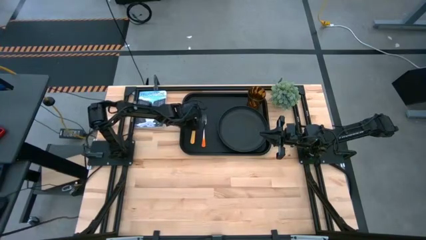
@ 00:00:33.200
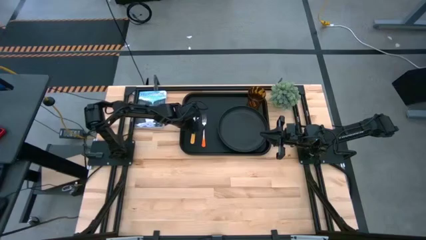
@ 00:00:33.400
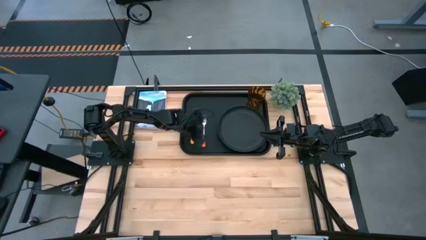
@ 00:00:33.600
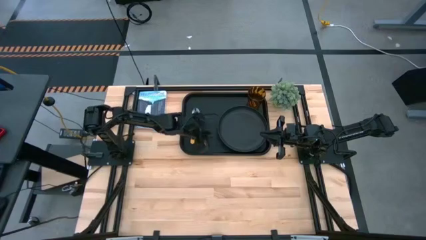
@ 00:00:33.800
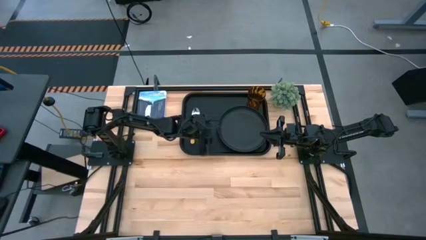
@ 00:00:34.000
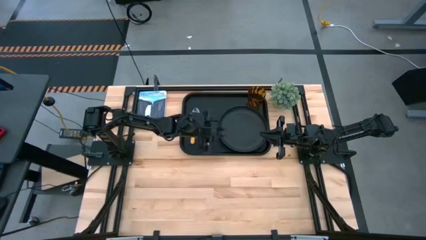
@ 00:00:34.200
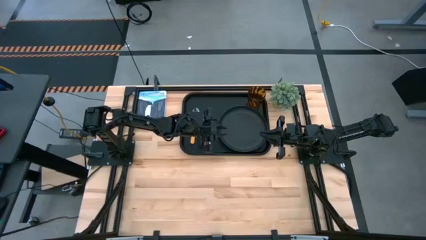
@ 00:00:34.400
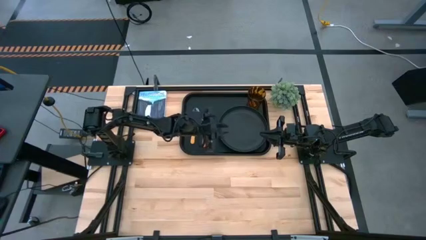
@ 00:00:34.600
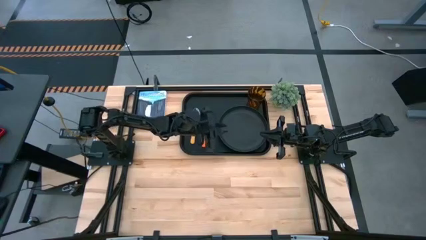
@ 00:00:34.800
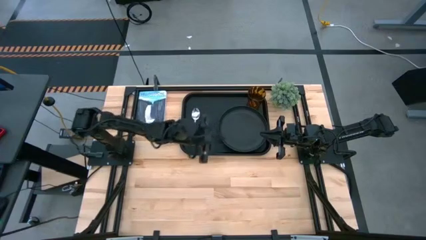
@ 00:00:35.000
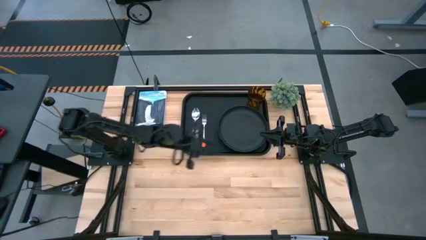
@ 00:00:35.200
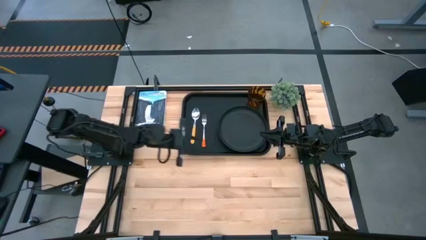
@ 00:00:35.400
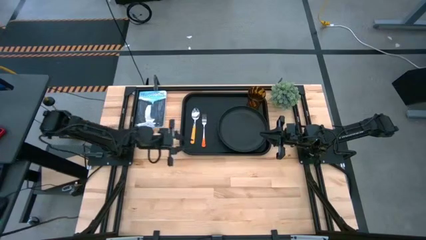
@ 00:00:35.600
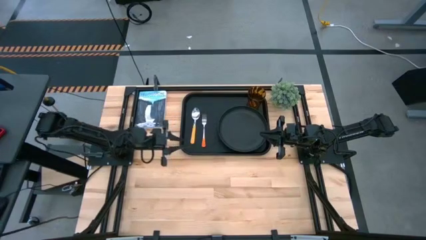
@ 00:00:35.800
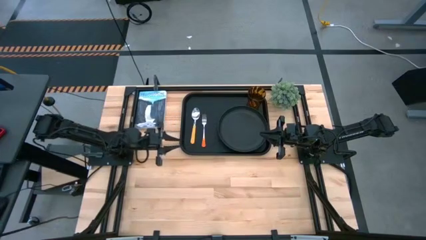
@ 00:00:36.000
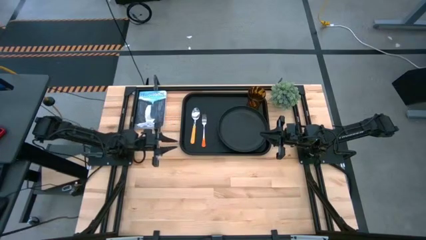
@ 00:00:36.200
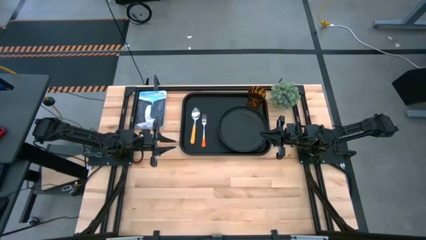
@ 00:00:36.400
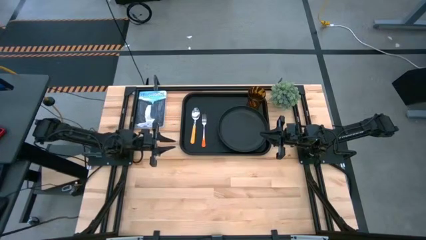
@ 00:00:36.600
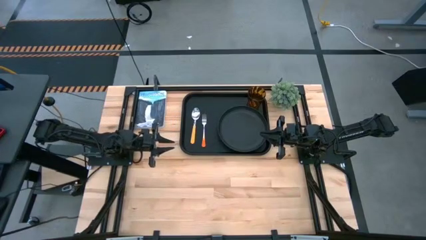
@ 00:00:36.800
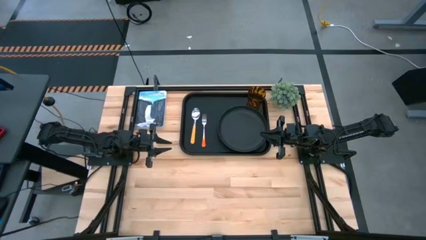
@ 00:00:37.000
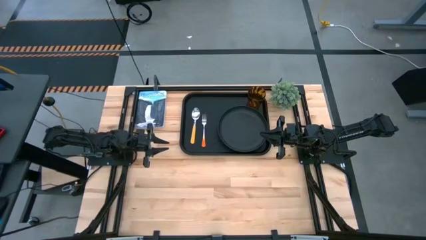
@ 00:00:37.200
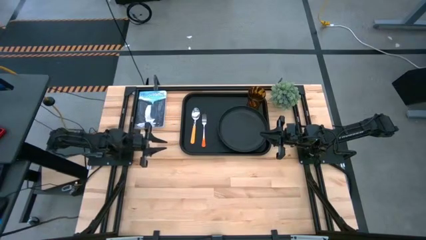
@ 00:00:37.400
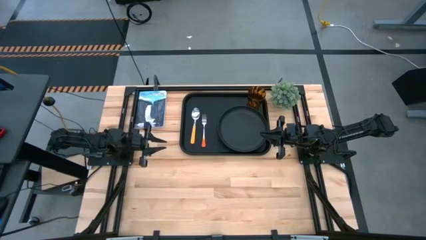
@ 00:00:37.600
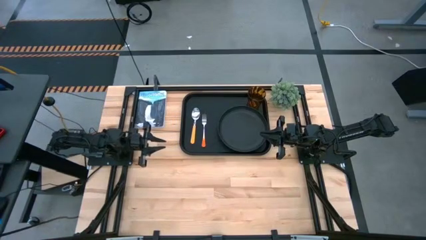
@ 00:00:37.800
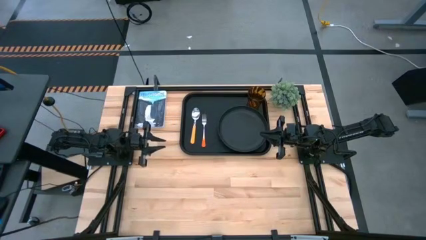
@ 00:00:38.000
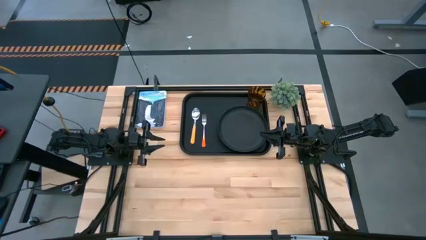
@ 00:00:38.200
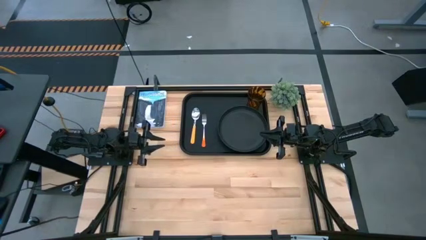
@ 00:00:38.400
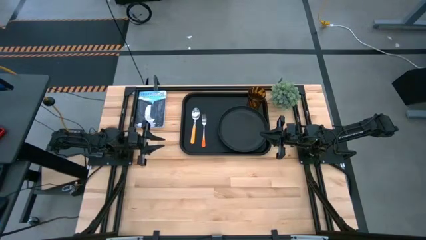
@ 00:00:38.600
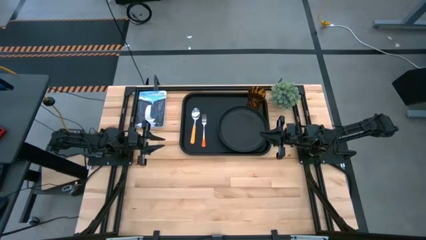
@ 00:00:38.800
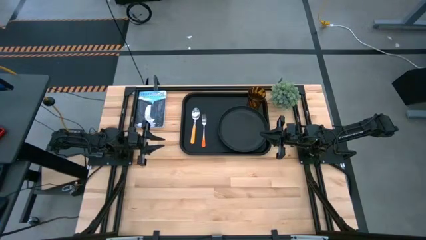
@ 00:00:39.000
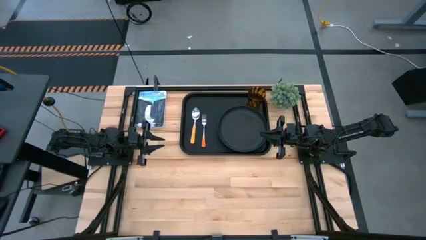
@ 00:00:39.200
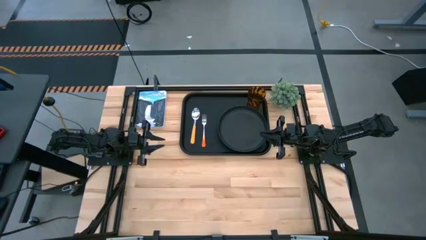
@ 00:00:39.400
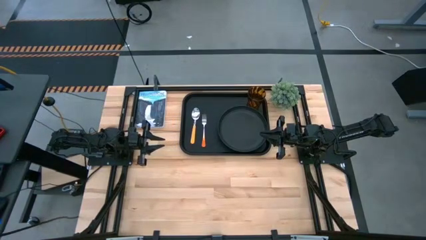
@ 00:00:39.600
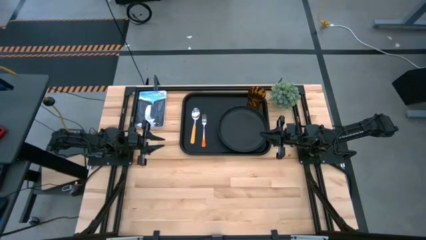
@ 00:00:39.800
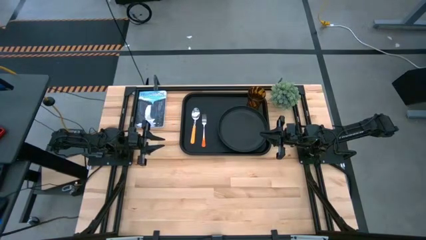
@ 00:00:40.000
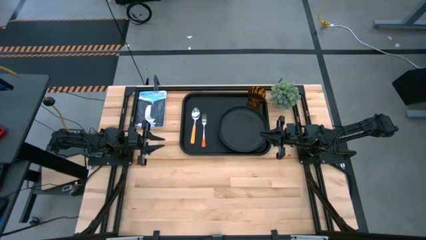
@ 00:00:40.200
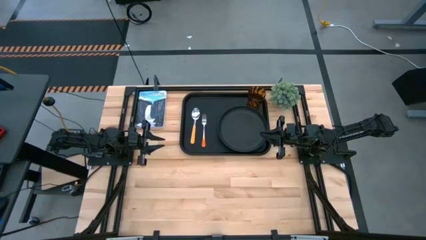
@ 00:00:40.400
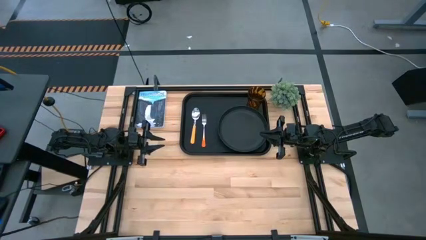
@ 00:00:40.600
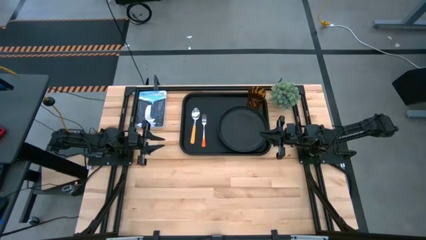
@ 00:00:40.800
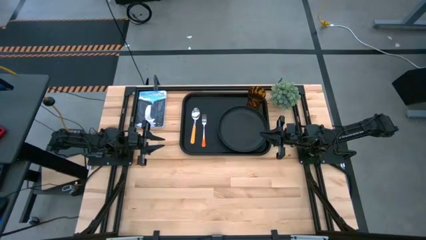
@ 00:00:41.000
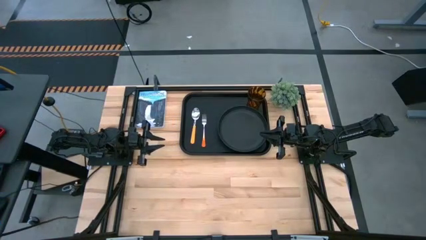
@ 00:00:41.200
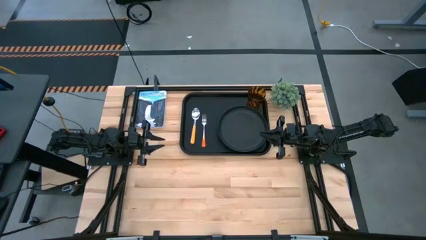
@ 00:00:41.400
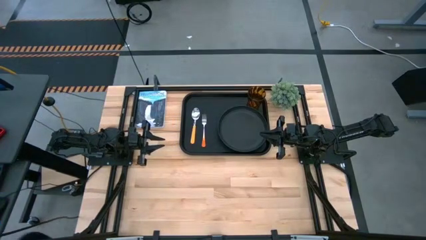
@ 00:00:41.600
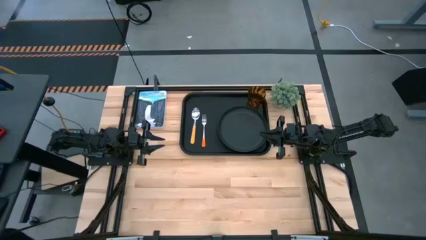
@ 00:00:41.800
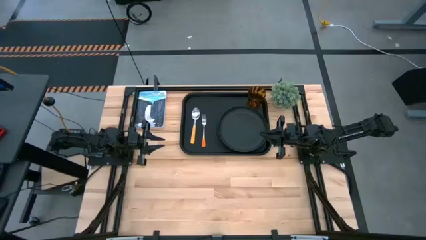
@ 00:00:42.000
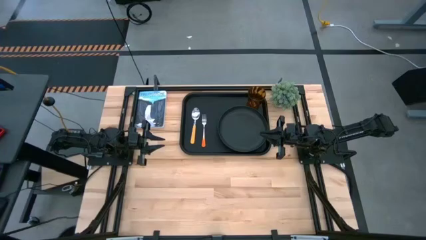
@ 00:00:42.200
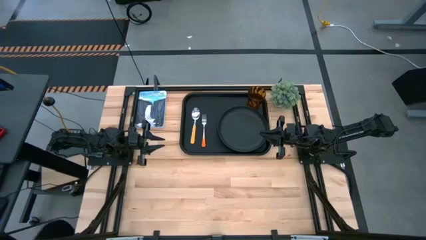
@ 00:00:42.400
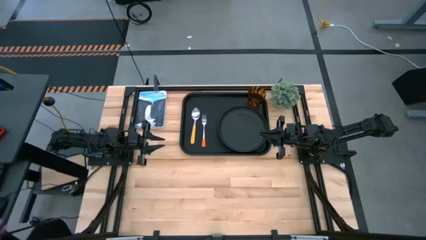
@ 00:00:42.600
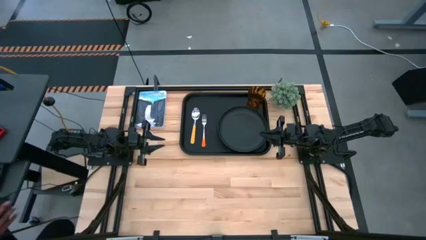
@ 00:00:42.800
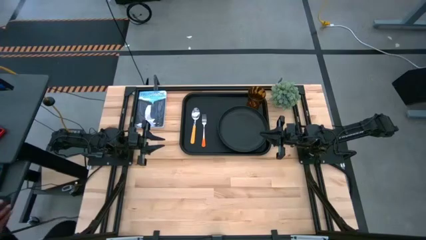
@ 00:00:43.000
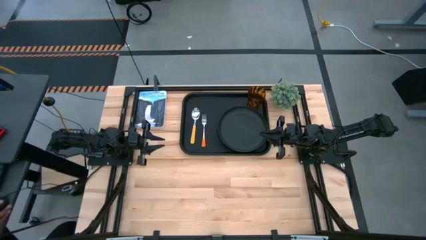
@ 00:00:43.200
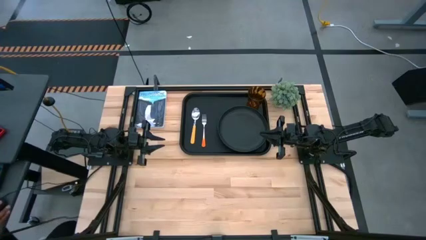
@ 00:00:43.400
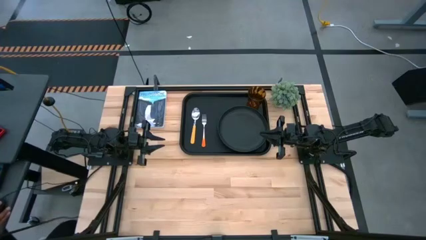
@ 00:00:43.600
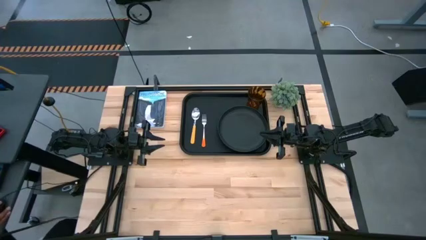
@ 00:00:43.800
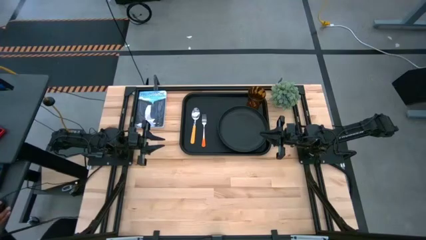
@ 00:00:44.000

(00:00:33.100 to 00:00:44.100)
Task: Pick and place plate/cup/fork/spoon on tray
Return to Home Position

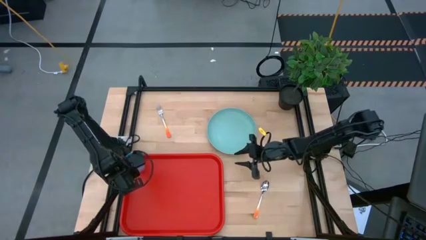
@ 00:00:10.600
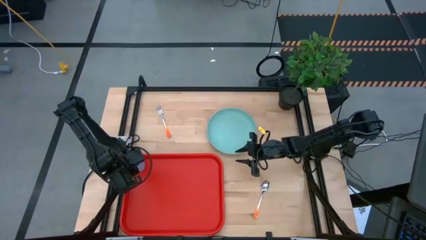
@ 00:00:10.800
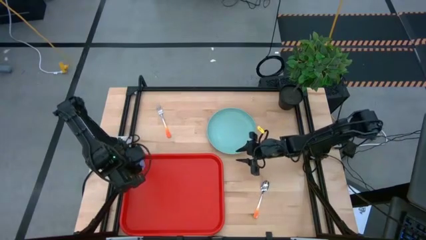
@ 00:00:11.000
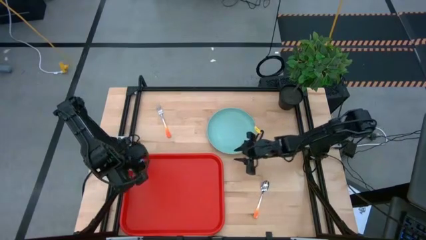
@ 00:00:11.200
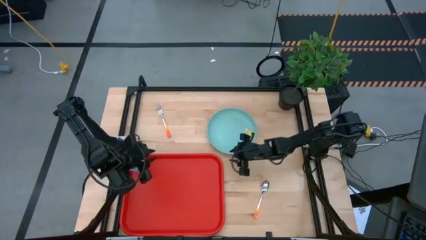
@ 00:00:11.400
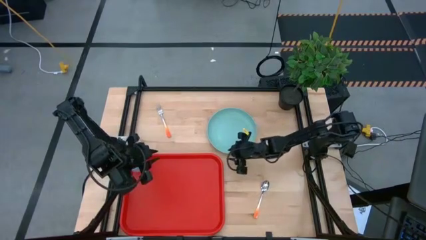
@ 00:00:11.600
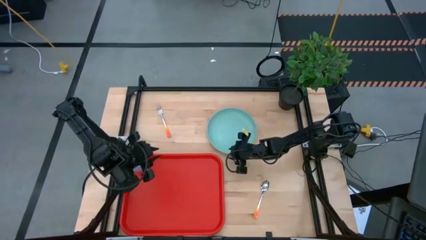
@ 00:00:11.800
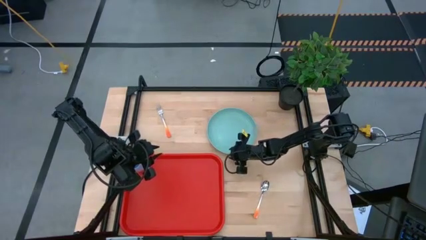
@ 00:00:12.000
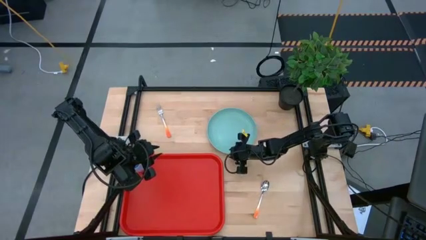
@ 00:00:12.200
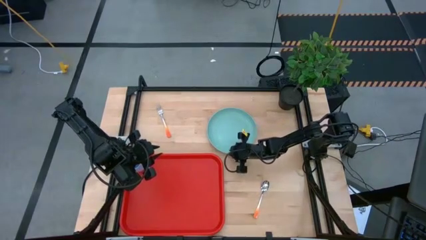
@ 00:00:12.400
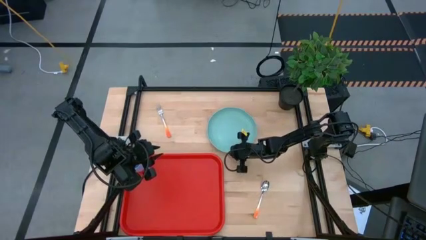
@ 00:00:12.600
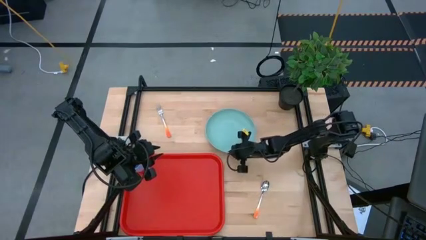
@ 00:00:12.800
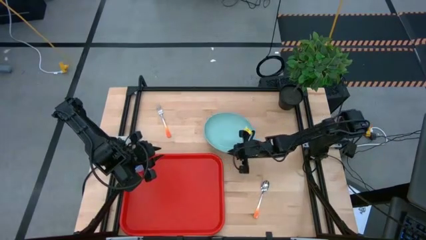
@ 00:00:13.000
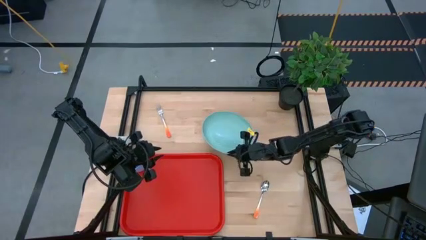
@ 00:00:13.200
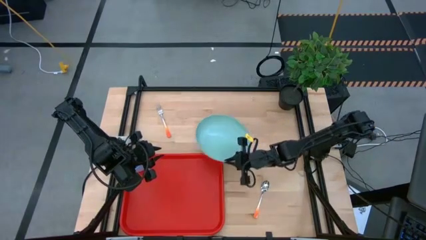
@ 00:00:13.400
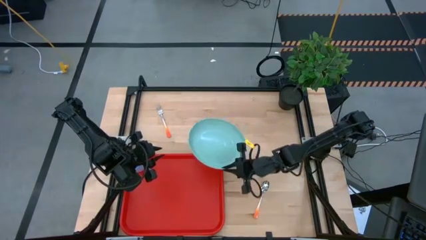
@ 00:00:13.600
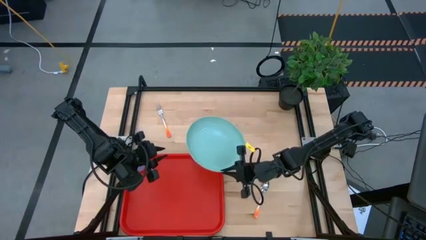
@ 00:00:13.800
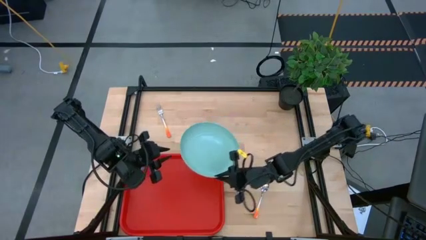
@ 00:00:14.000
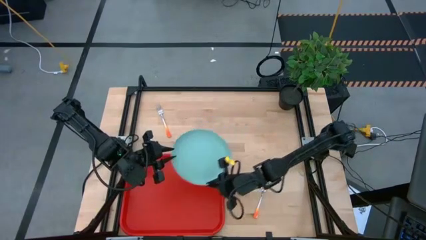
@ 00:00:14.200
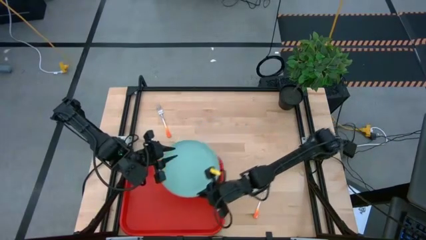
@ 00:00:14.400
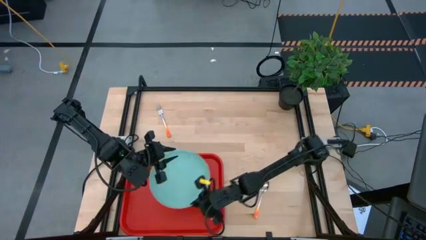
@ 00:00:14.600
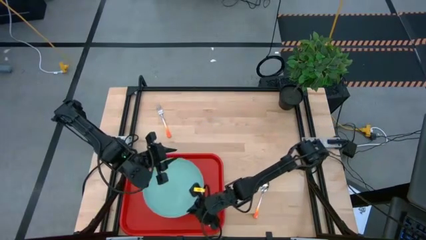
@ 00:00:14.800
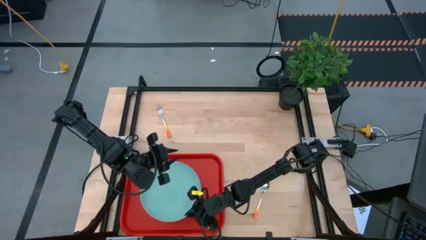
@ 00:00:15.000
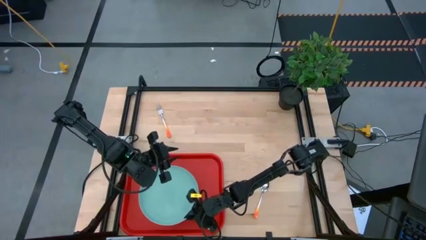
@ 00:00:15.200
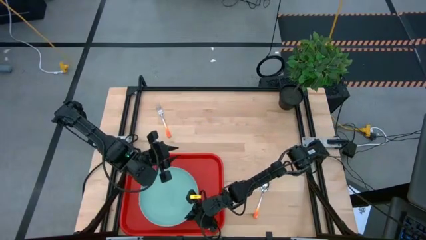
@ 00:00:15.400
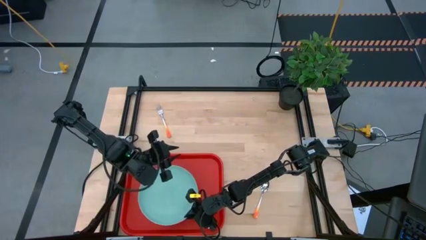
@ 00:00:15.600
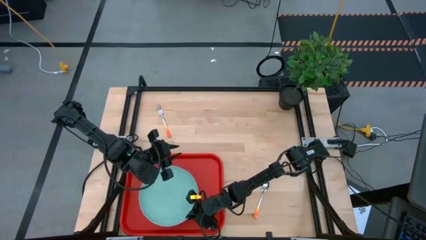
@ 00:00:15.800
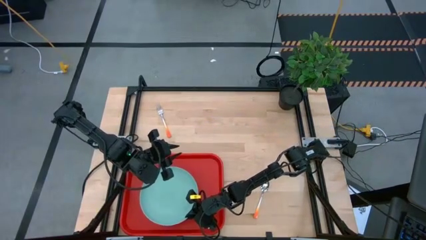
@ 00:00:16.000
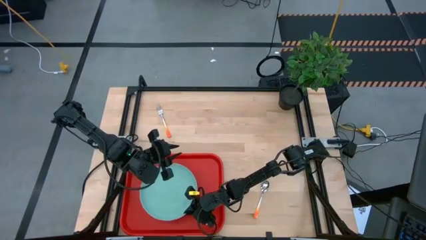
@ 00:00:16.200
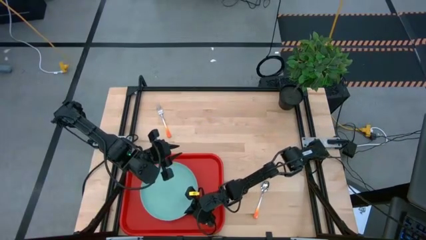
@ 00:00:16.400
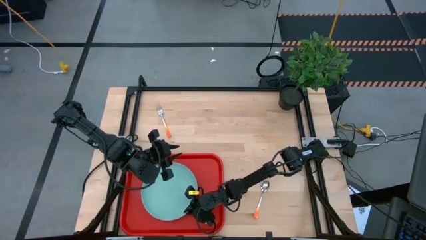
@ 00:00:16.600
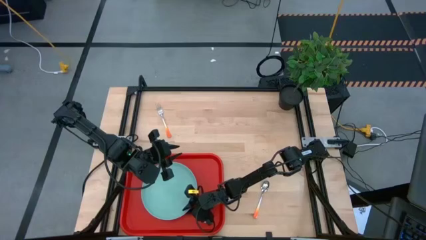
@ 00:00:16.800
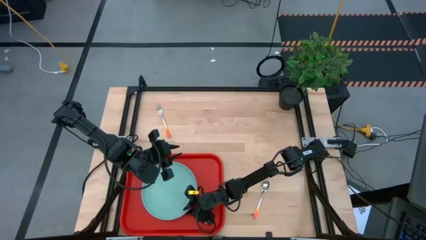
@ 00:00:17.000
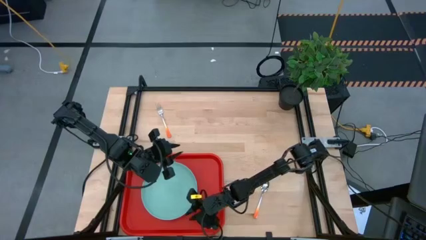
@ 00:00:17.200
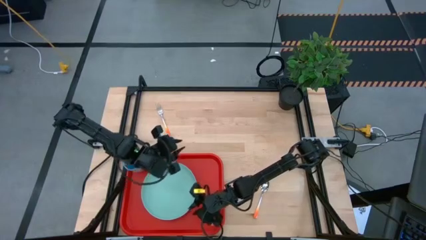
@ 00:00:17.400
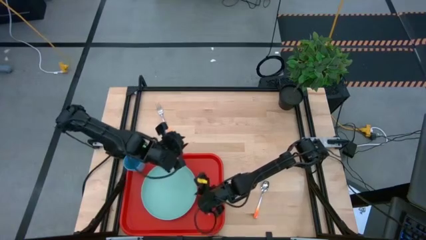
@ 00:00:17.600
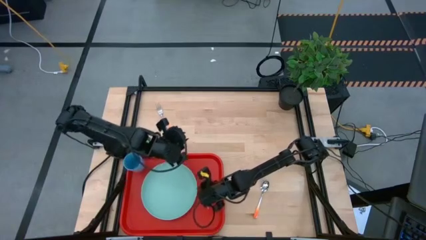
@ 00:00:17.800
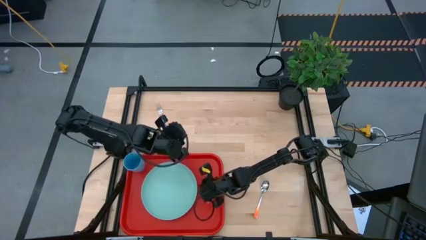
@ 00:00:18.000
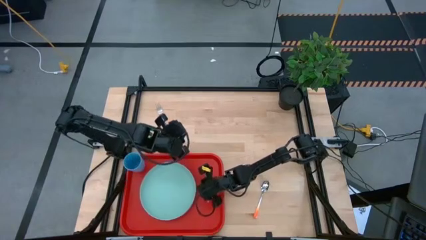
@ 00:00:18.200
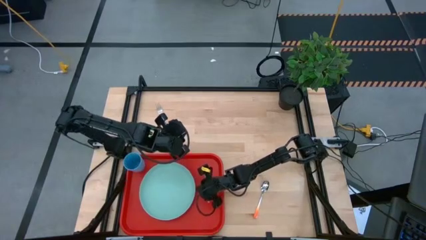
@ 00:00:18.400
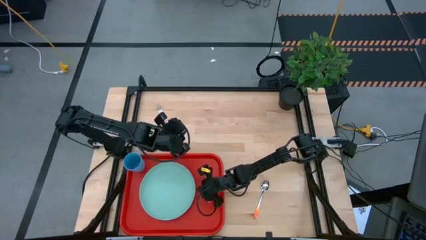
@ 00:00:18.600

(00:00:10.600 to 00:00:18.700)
Task: Pick and place plate/cup/fork/spoon on tray
Put the light blue plate on the orange tray
